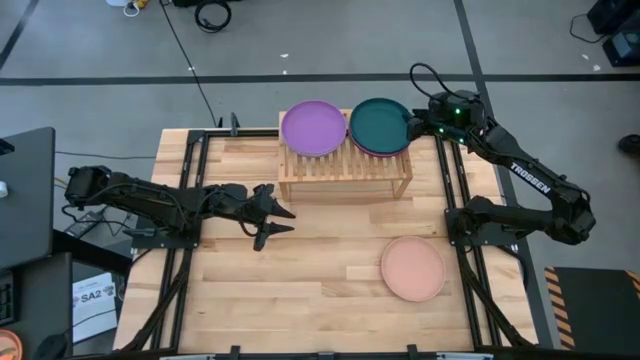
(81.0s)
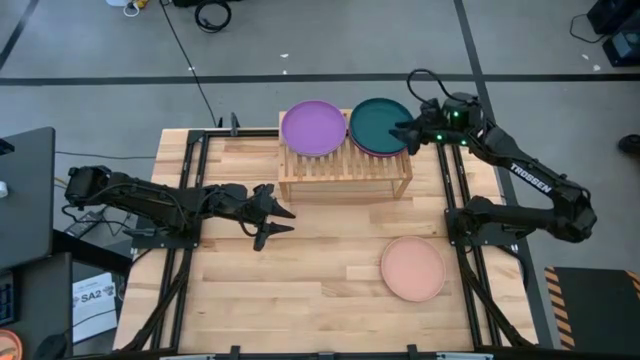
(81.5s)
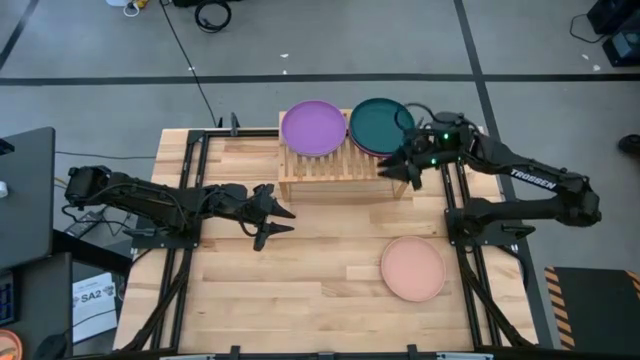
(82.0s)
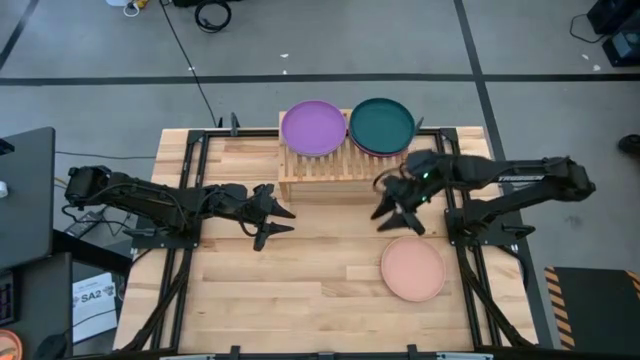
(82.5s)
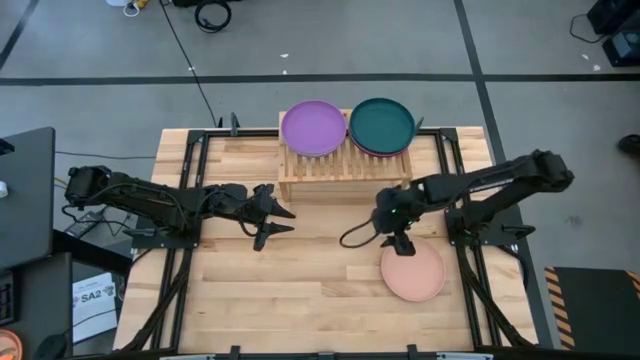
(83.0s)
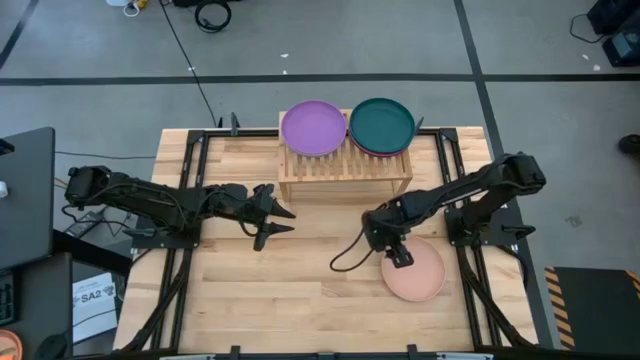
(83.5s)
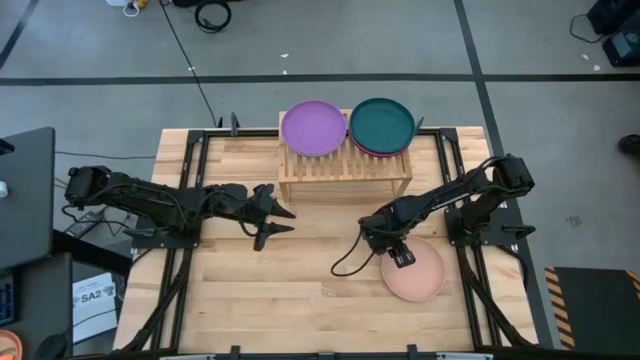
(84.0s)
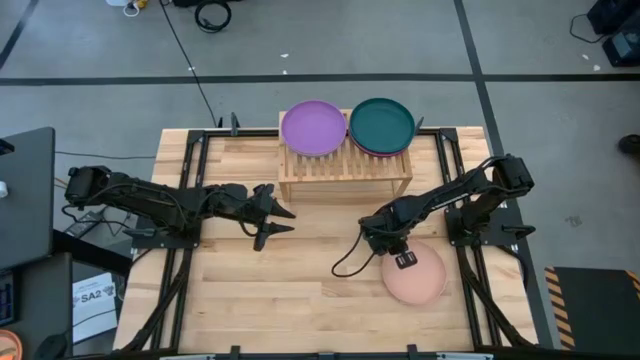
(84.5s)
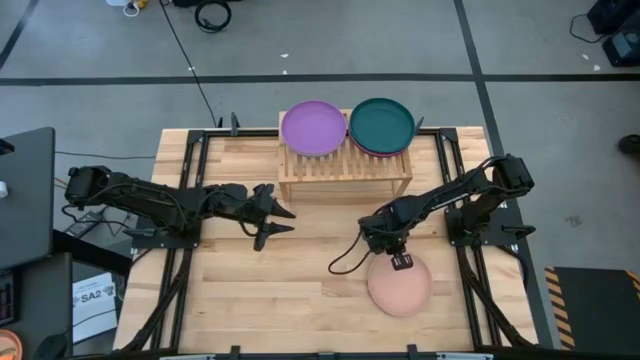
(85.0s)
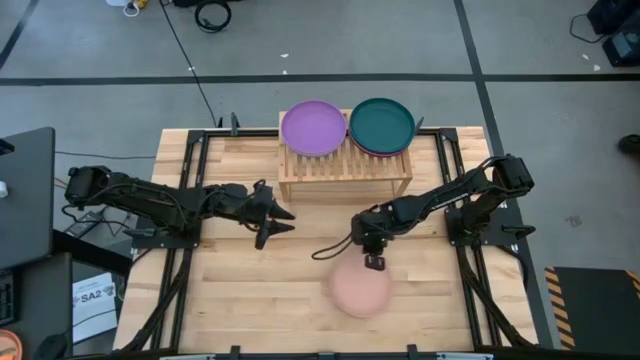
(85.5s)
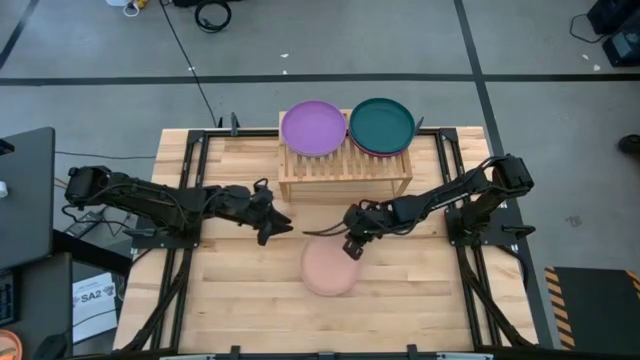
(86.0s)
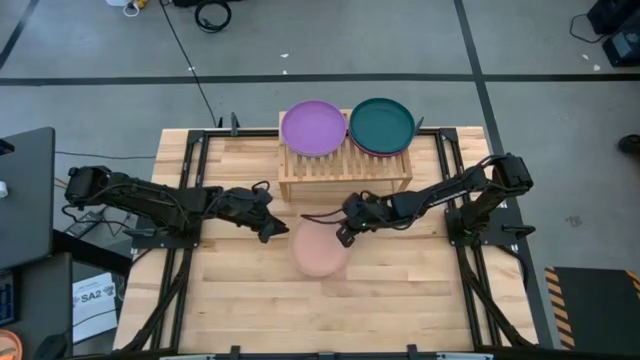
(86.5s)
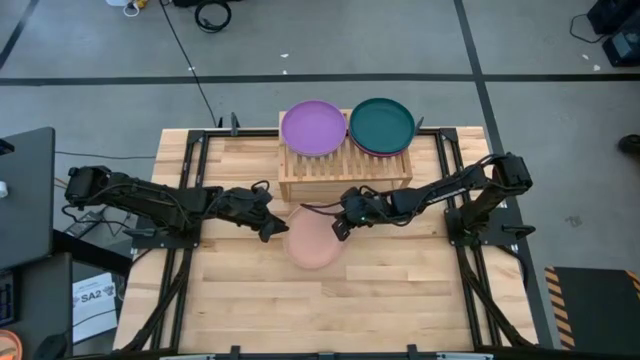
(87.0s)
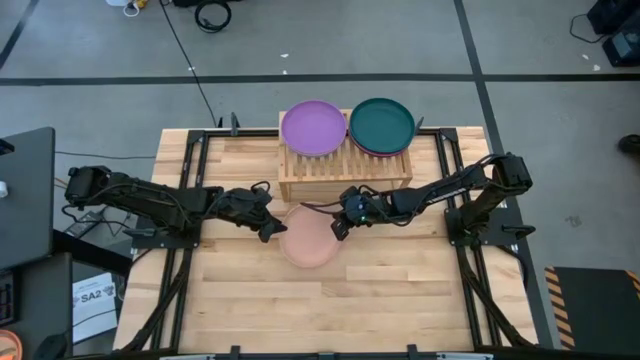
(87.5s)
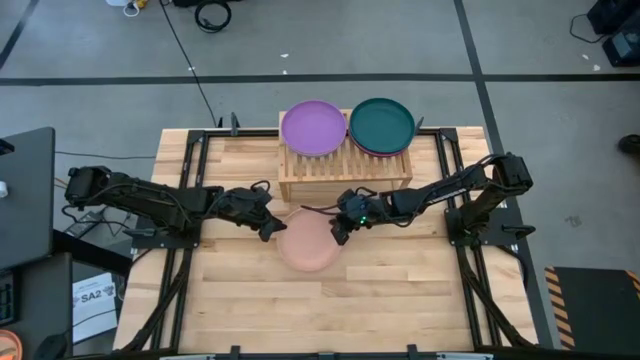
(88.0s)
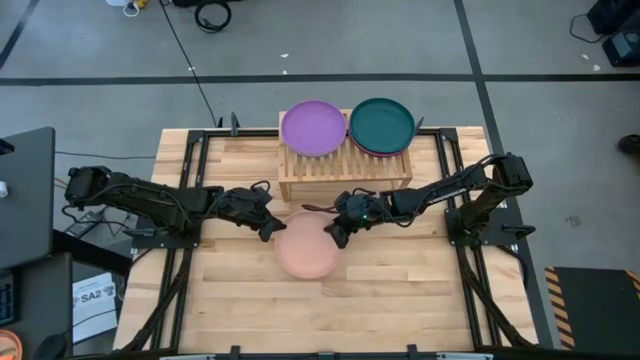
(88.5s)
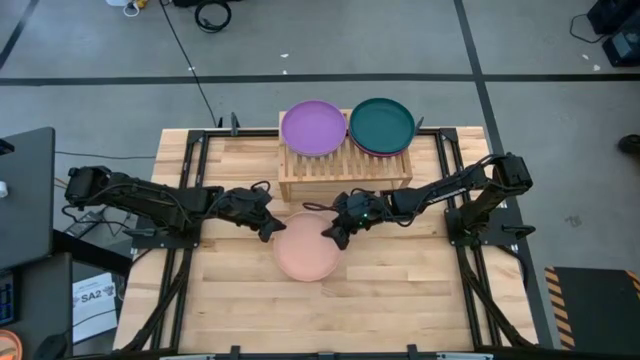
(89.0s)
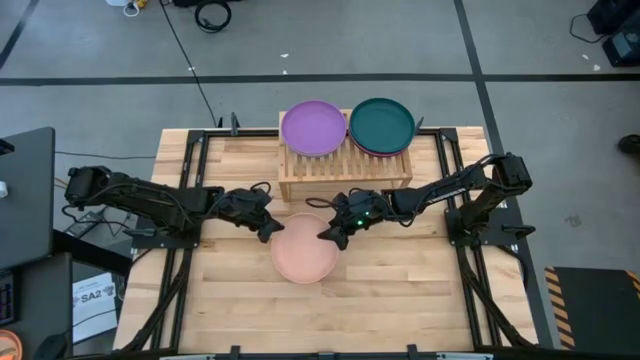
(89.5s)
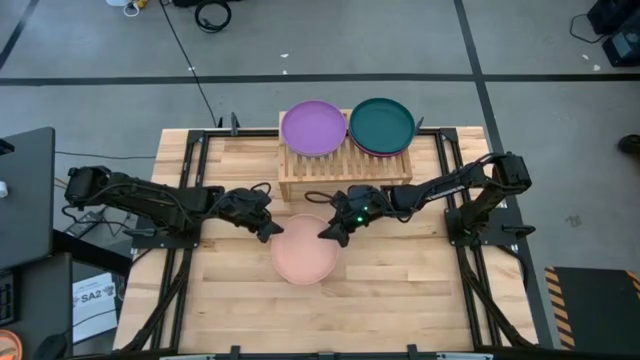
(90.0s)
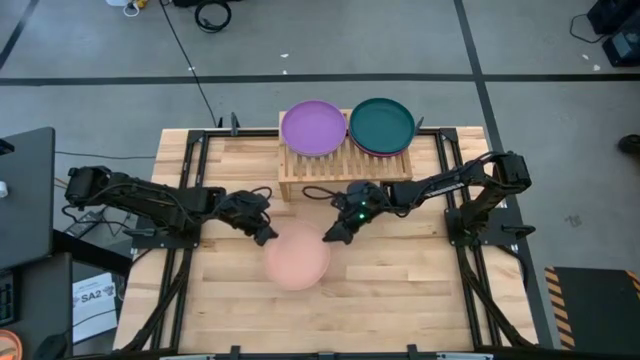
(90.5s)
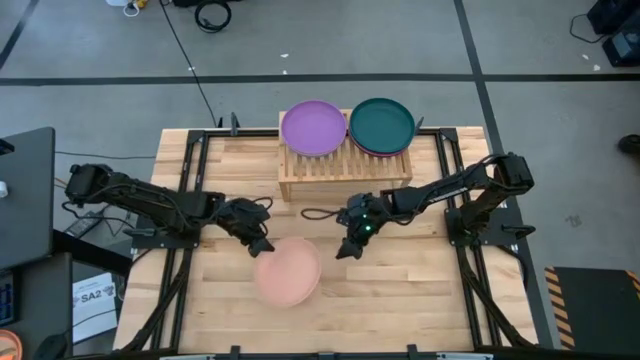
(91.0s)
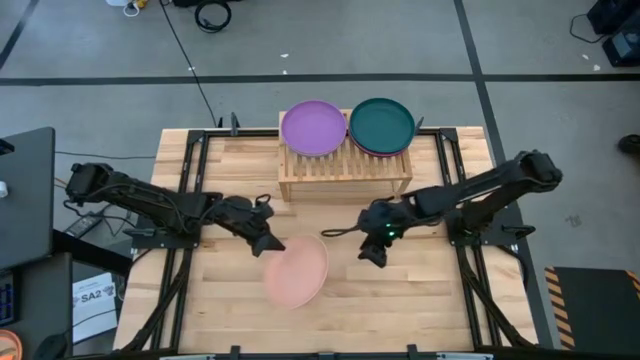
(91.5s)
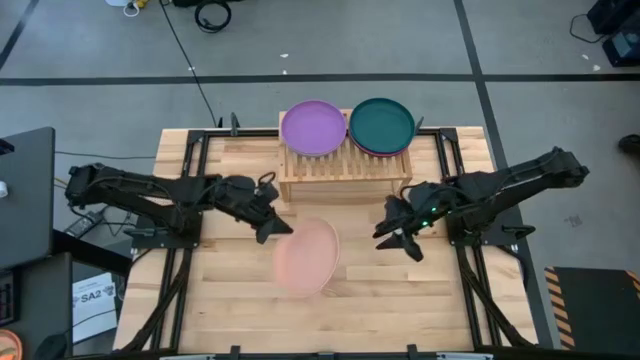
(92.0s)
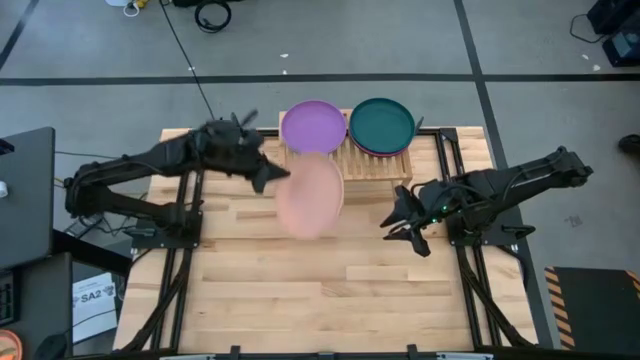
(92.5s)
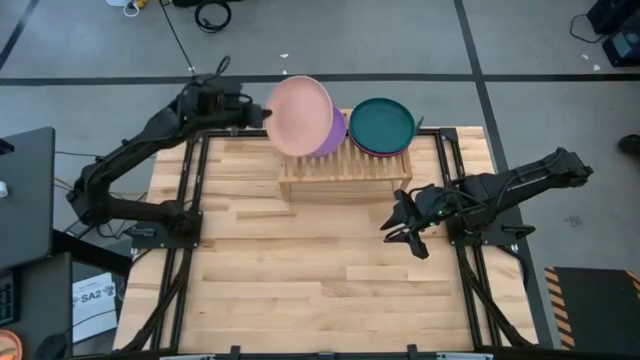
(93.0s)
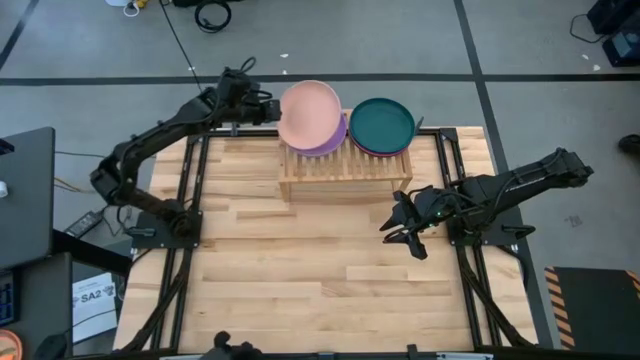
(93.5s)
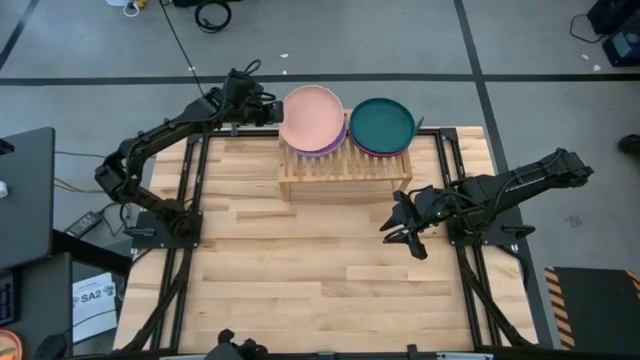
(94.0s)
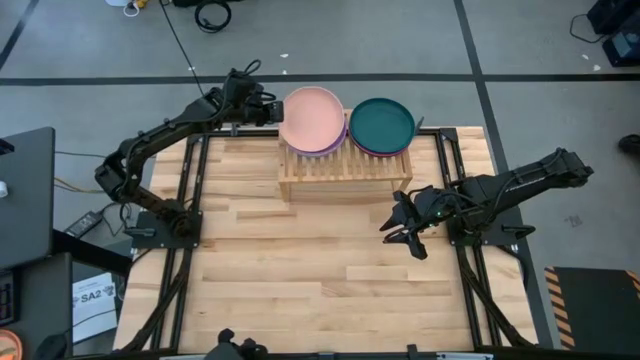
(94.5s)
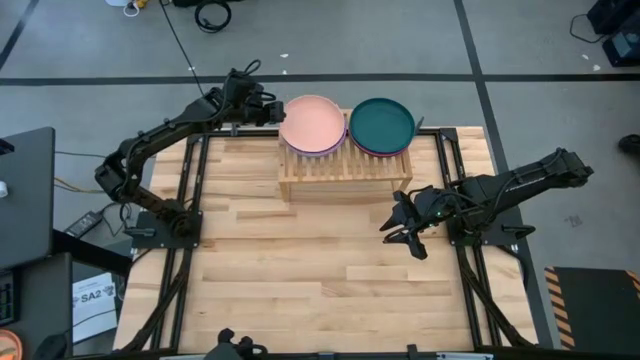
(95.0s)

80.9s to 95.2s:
Task: Place and stack plates onto a shelf
Stack the light orange plate on the violet plate on the shelf

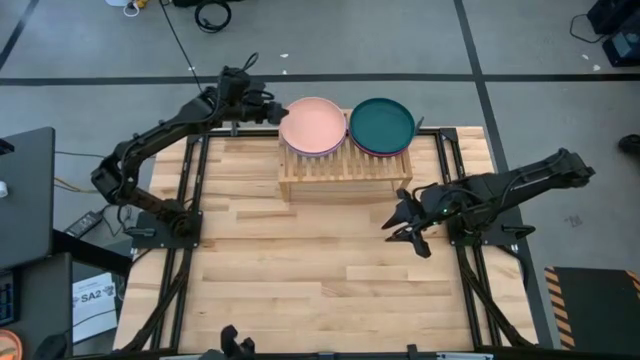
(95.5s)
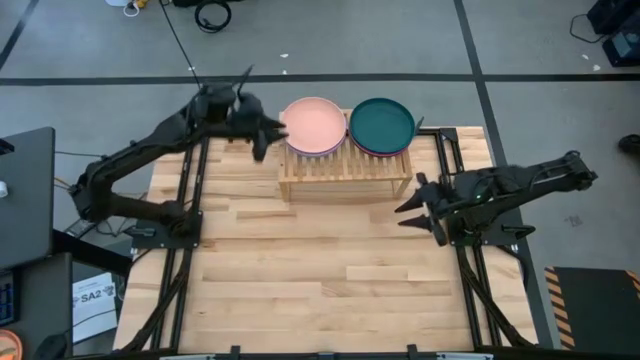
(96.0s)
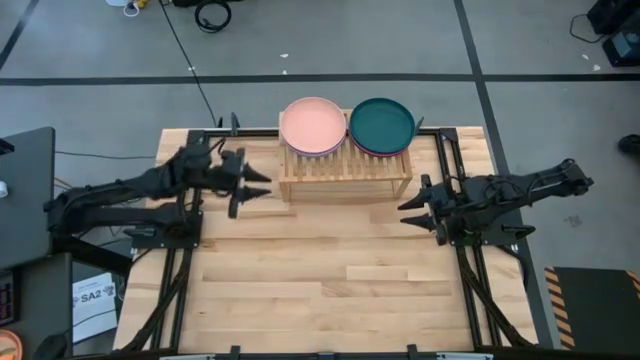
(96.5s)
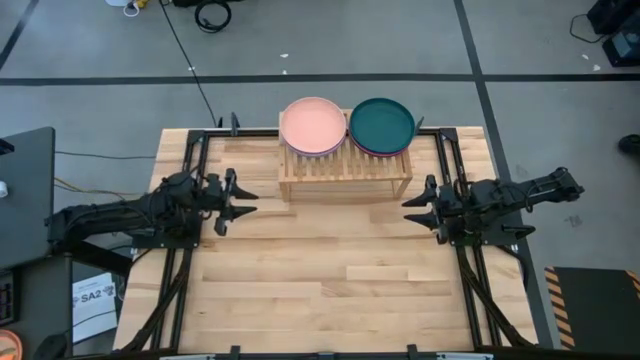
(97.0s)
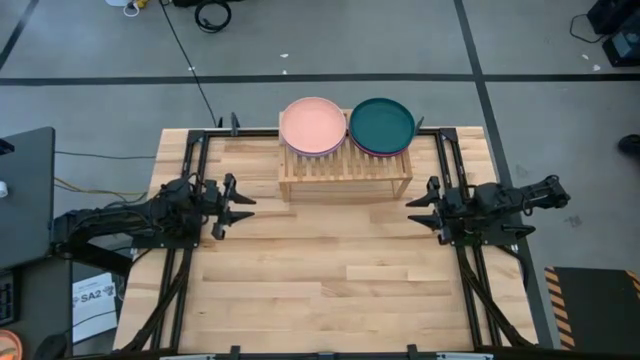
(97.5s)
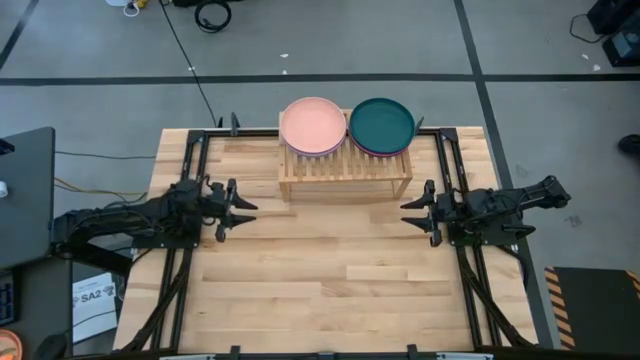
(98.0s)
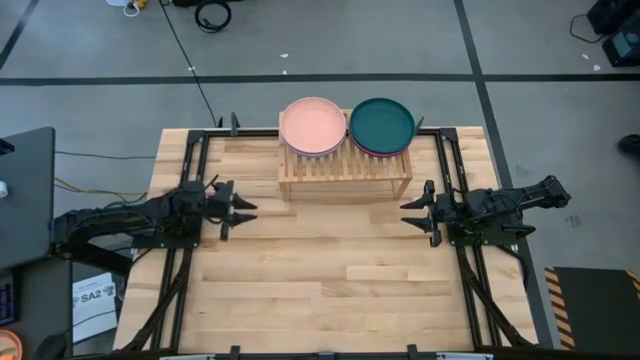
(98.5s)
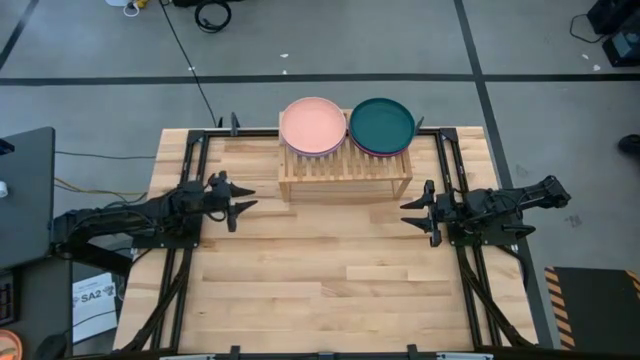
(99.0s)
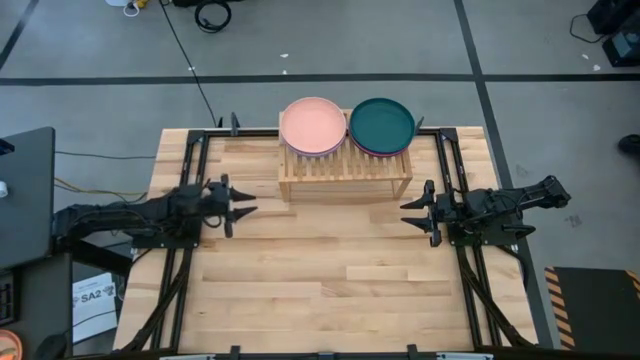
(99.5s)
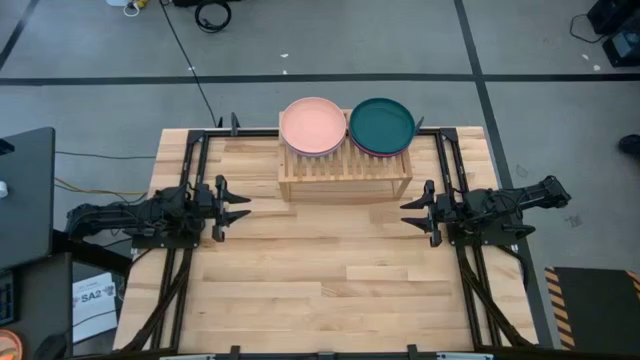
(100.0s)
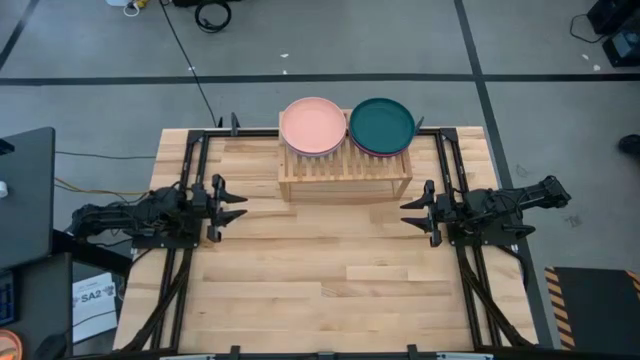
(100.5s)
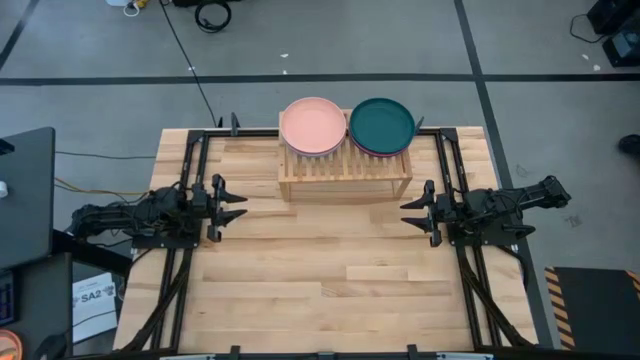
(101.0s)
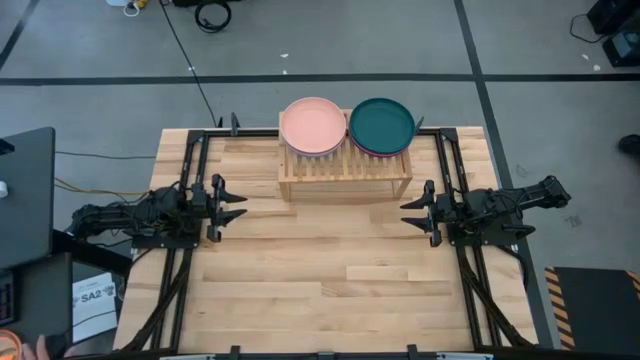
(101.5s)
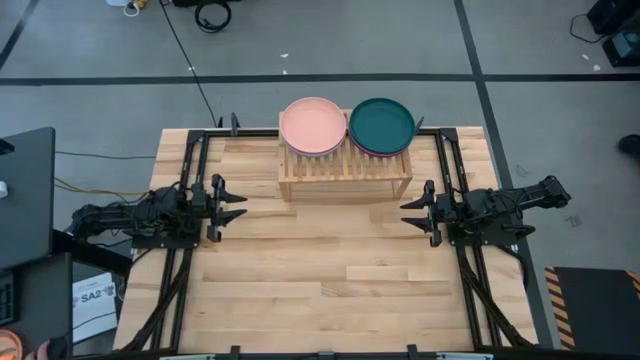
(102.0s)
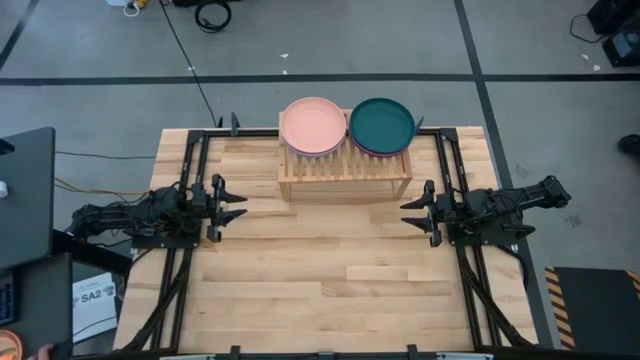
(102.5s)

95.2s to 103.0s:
Return to Home Position
